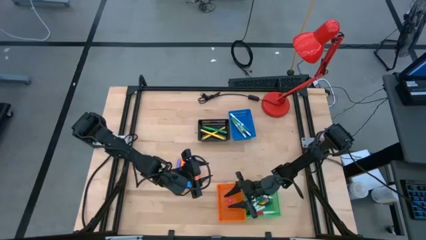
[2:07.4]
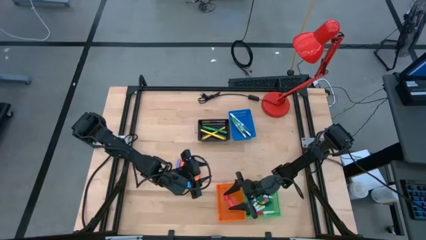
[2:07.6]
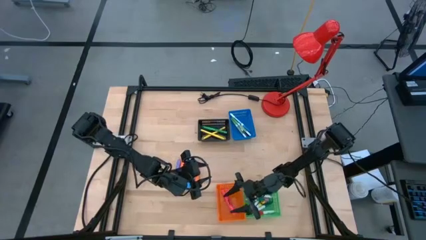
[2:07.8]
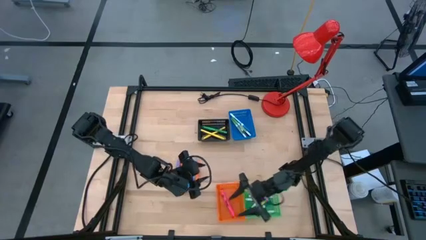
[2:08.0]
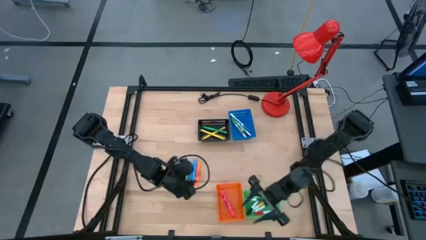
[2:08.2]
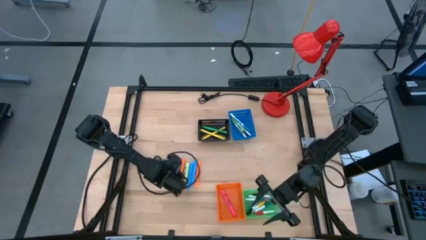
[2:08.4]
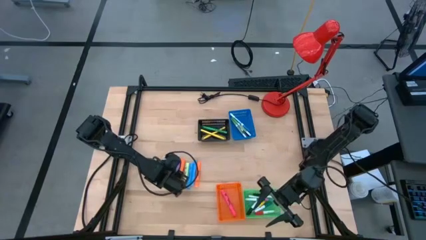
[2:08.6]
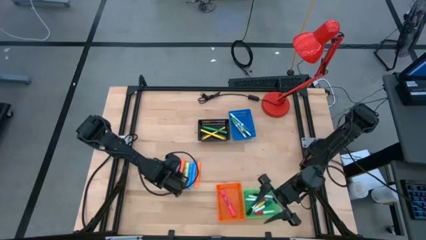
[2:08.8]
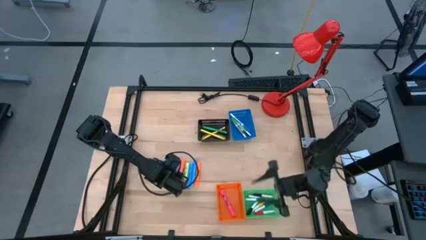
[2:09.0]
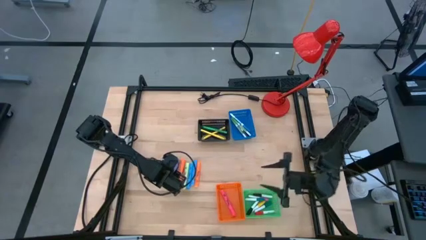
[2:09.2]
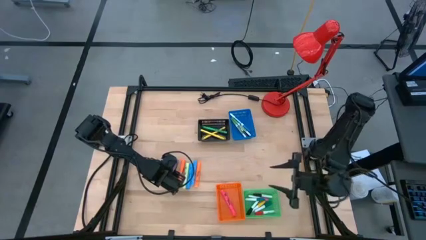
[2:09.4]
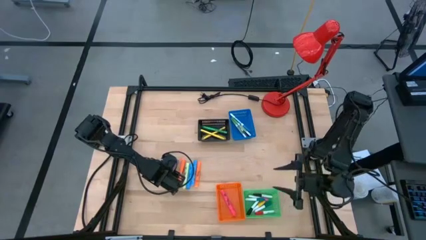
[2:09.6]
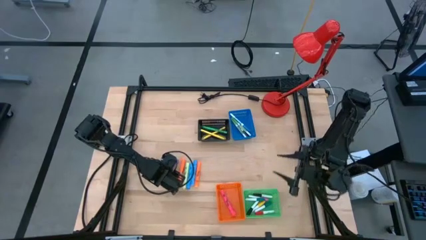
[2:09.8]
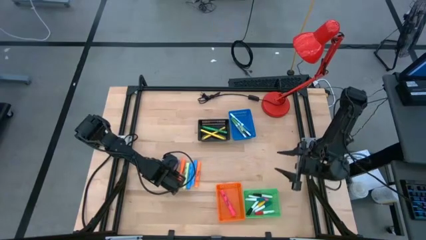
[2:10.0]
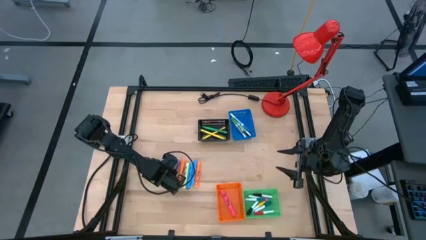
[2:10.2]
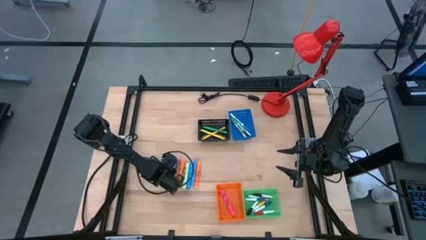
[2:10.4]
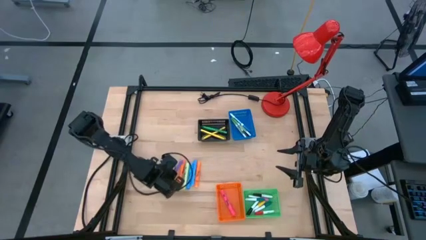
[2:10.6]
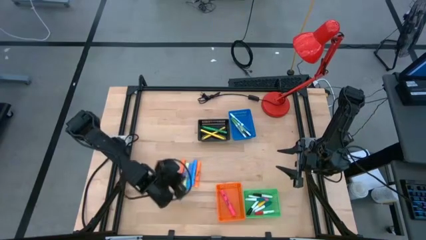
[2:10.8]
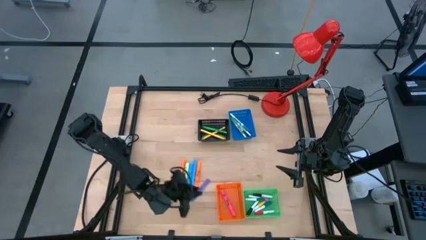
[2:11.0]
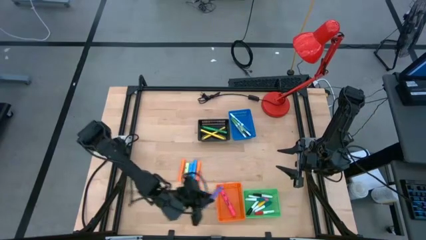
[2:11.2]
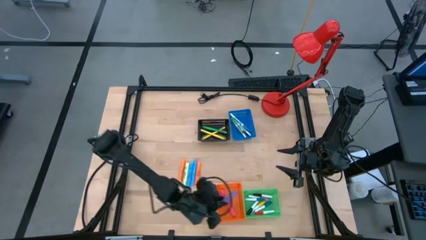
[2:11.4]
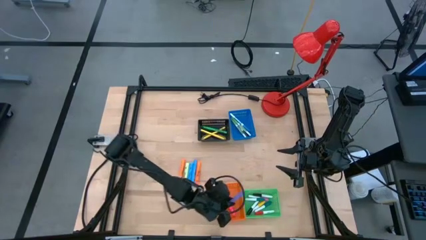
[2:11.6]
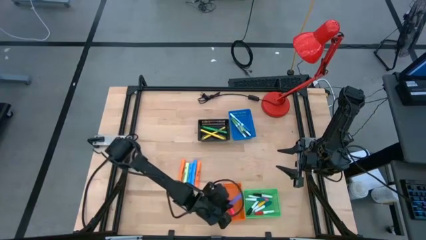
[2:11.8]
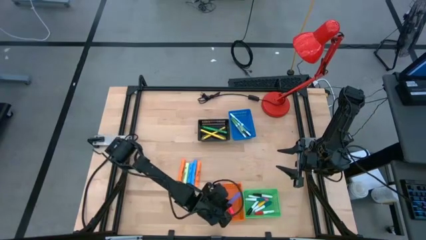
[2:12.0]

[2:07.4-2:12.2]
Task: Pick & Place Markers
Put the violet highlighter pen into the orange bin

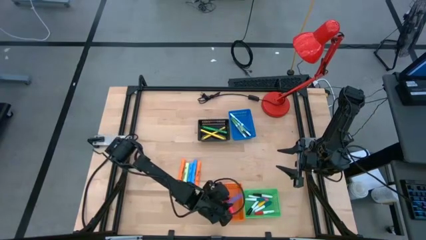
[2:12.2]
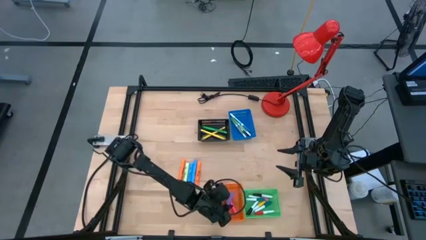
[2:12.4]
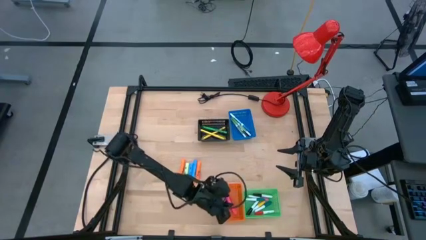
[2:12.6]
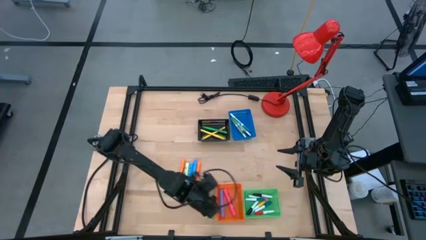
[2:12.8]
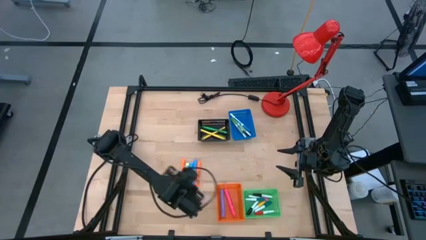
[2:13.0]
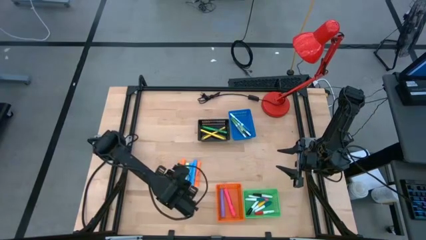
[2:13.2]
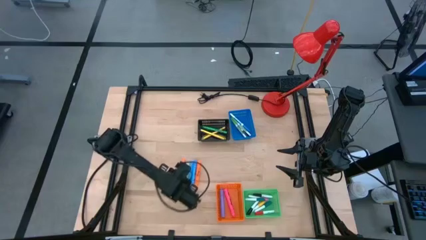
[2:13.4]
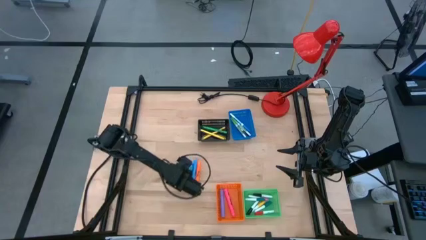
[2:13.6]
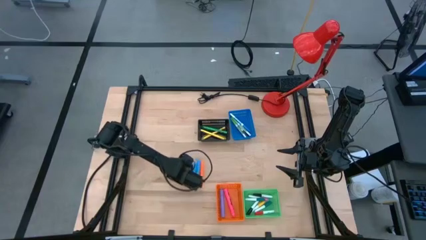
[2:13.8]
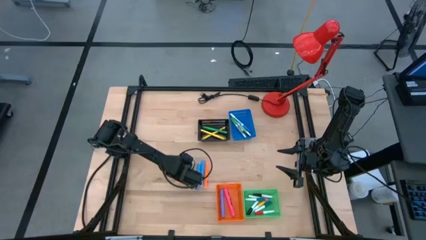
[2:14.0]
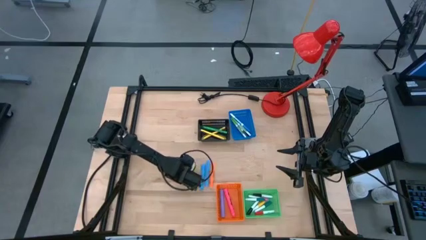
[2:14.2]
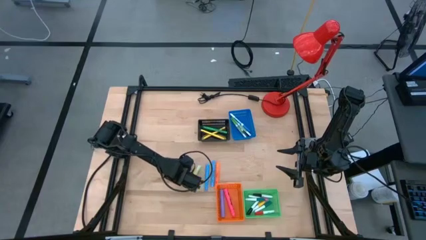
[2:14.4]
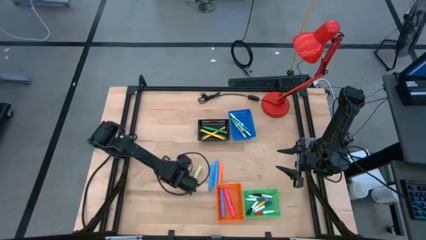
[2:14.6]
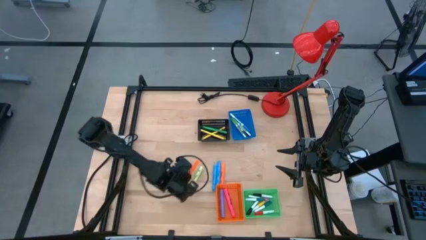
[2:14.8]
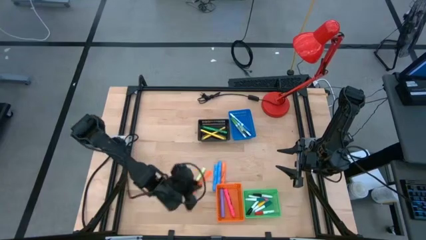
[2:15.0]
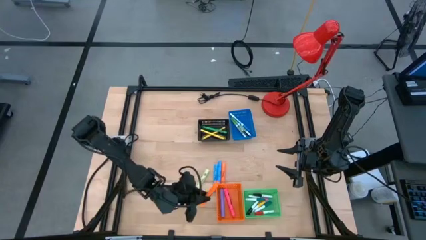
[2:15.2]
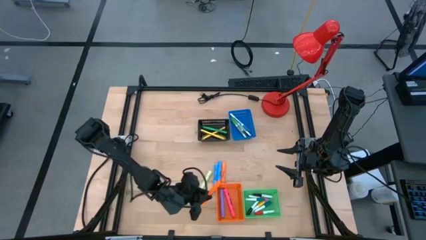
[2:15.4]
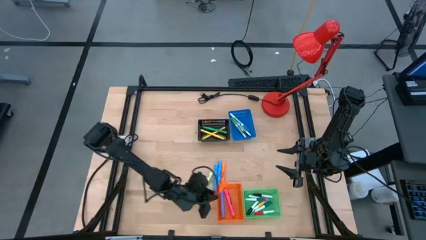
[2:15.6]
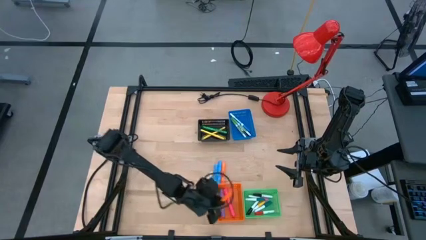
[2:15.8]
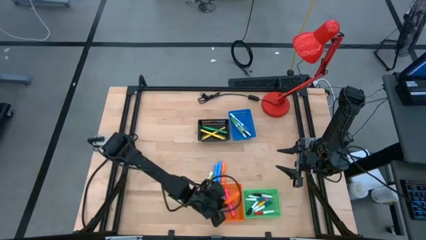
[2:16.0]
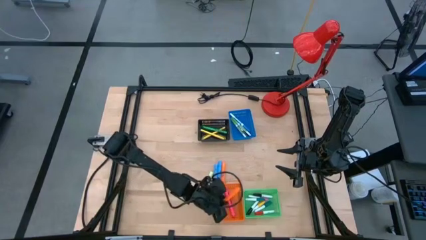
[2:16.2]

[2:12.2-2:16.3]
Put the orange highlighter pen into the orange bin

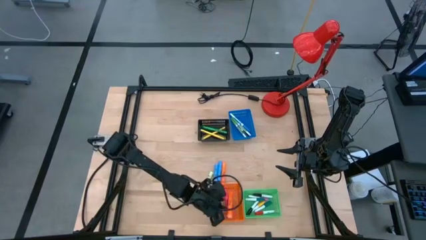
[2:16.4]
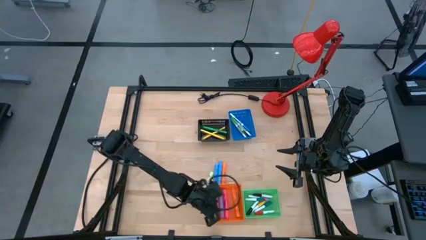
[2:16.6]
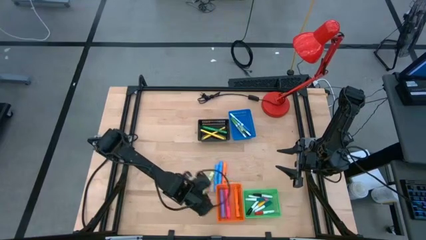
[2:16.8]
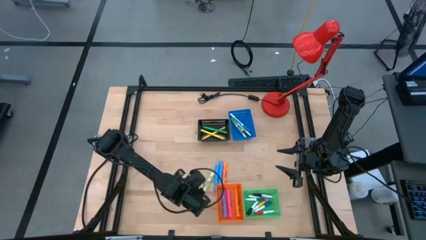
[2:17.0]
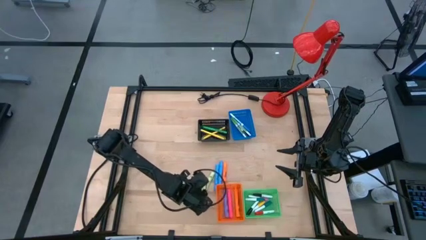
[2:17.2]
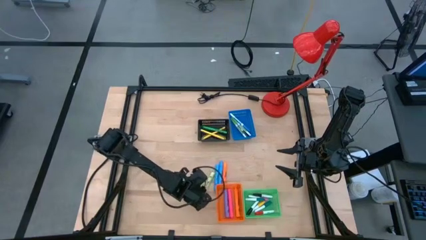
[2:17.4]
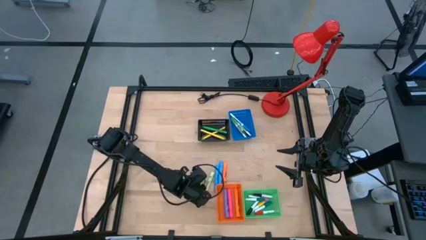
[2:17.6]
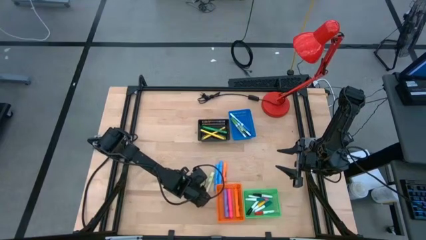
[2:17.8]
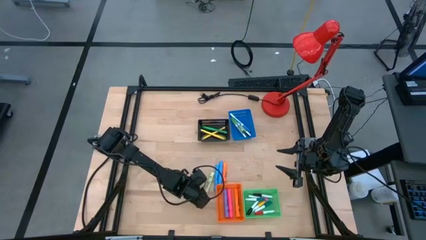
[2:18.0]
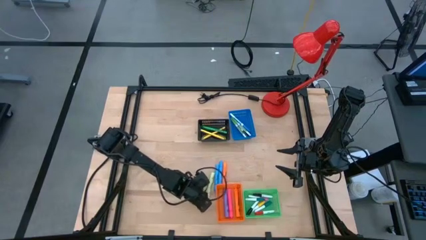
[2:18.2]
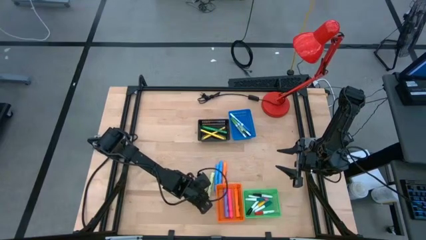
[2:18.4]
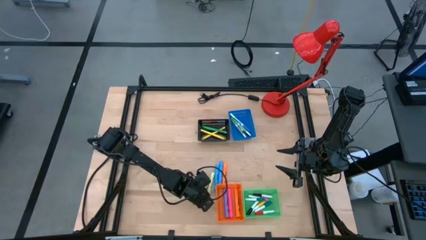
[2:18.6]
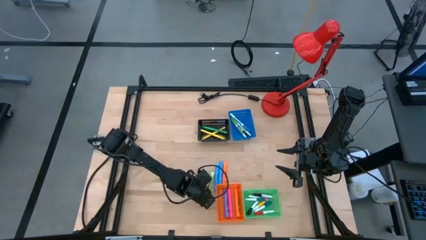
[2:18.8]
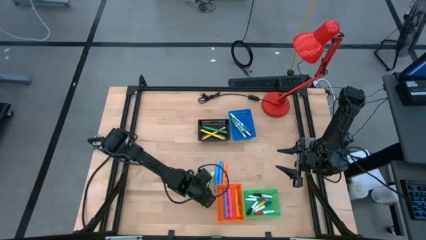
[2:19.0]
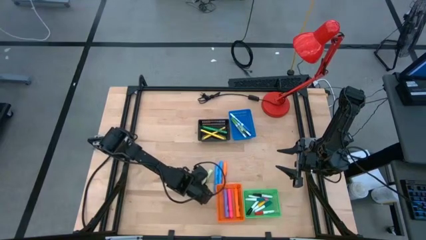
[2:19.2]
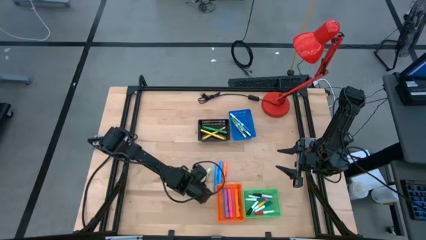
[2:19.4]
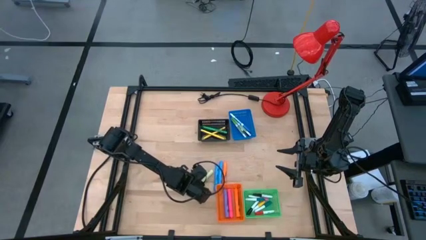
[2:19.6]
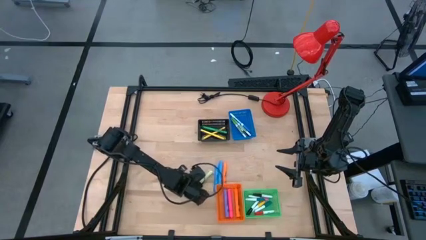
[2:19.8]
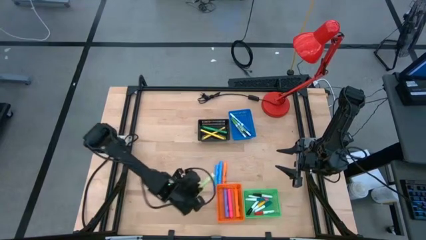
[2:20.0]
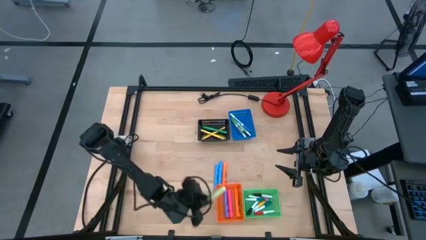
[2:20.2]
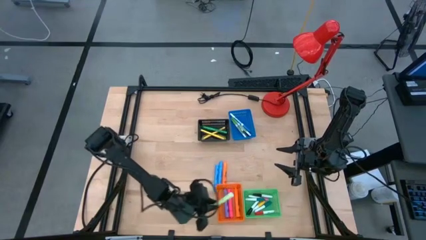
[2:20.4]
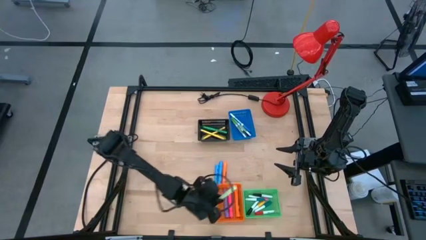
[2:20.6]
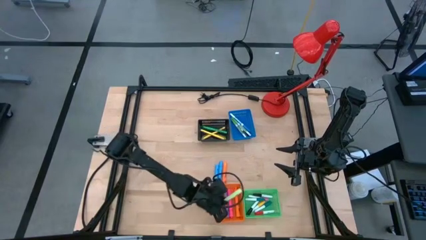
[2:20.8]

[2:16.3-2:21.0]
Put the green highlighter pen into the orange bin

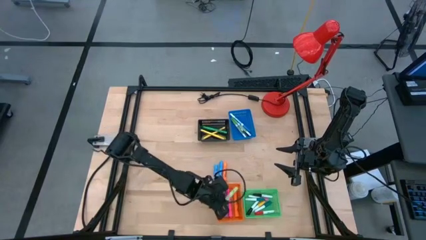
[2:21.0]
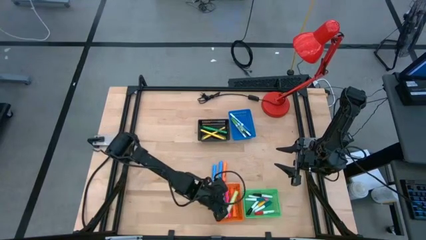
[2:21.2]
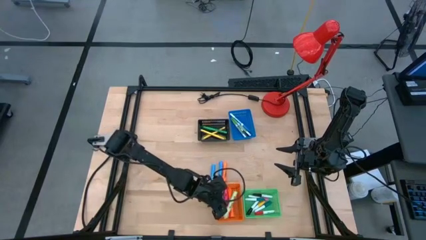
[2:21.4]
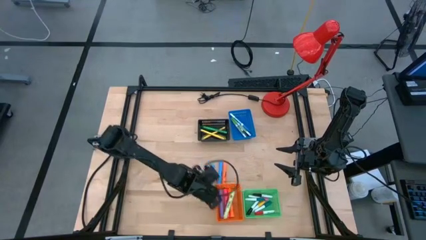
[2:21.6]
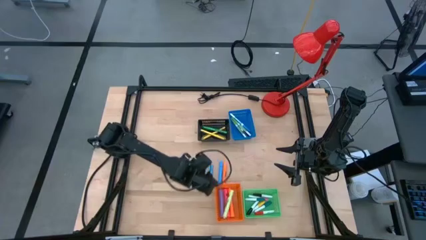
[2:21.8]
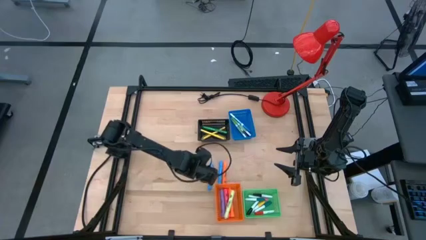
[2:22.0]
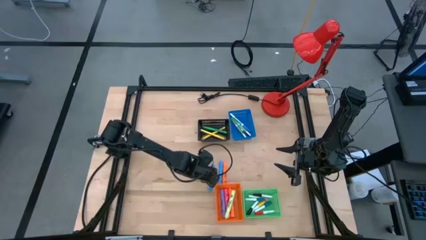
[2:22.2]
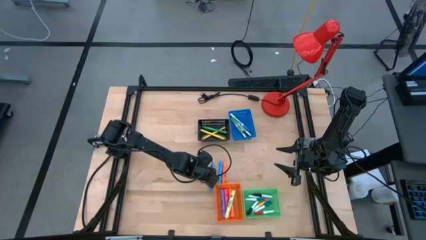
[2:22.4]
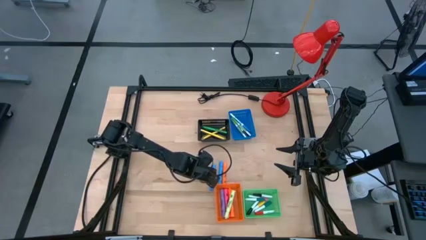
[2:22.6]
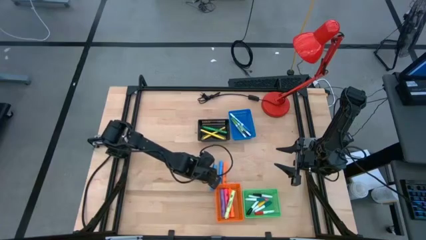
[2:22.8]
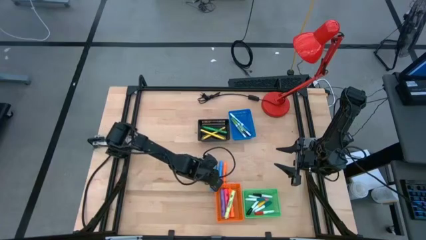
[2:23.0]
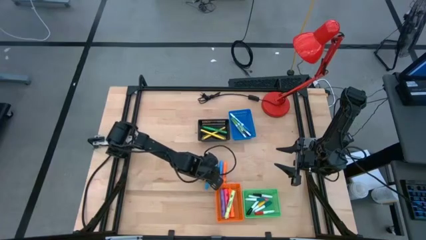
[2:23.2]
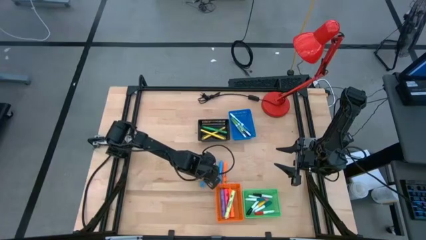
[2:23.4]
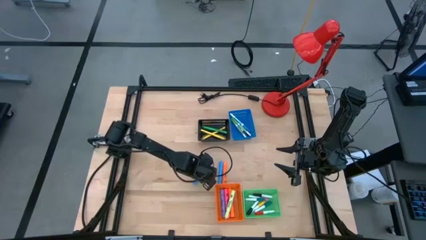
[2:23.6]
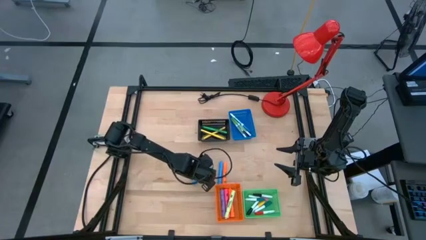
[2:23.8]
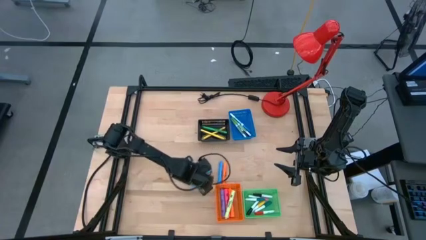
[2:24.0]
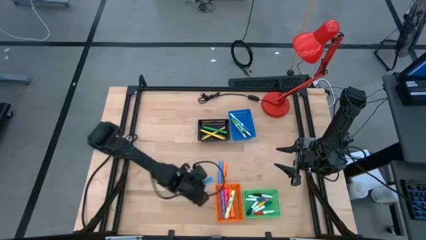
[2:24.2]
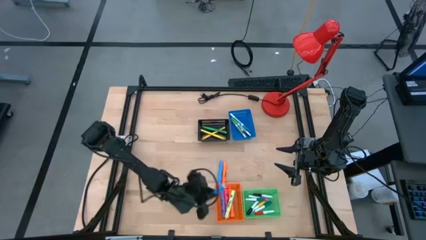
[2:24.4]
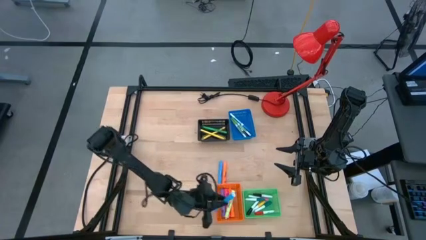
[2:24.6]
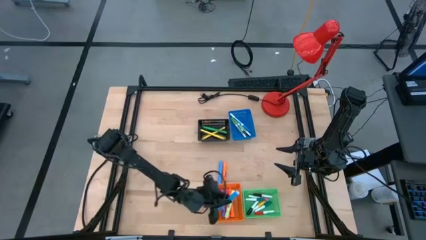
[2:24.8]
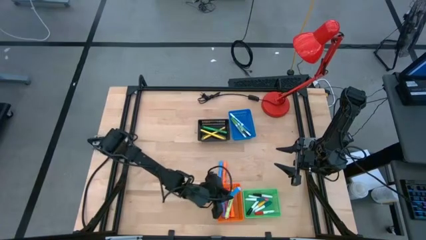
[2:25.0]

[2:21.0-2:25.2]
Put the blue highlighter pen into the orange bin
